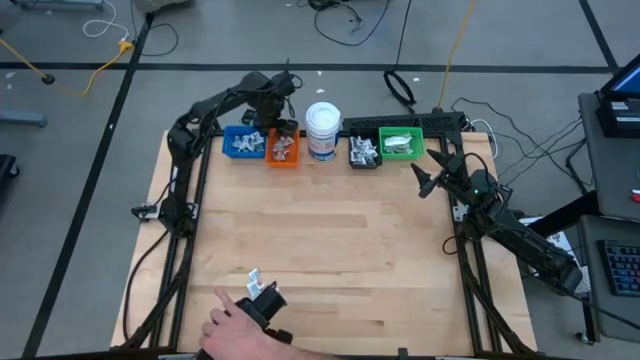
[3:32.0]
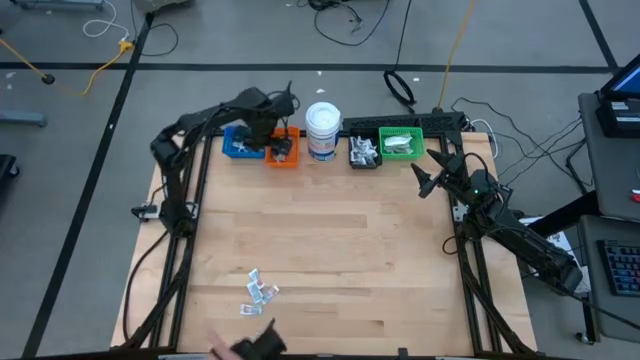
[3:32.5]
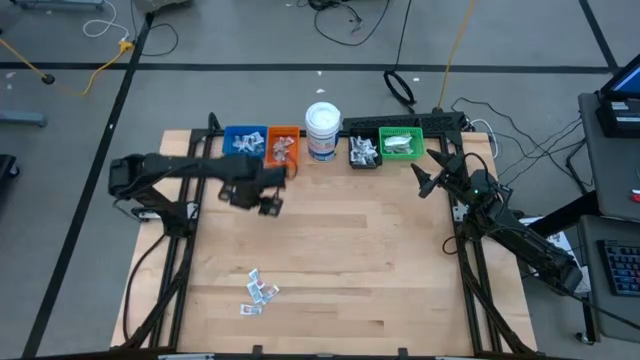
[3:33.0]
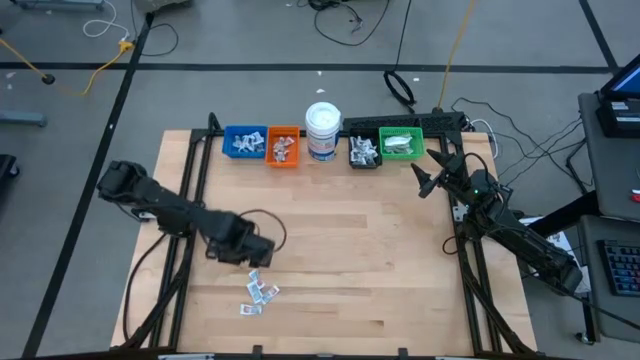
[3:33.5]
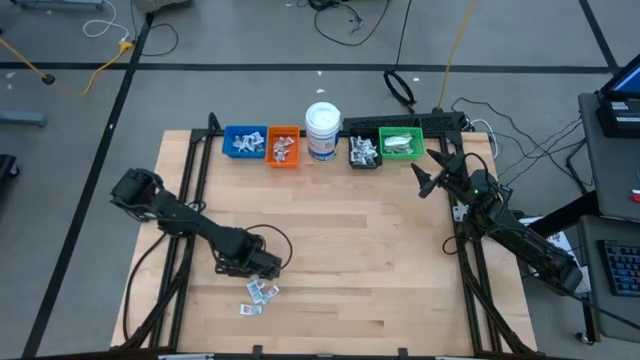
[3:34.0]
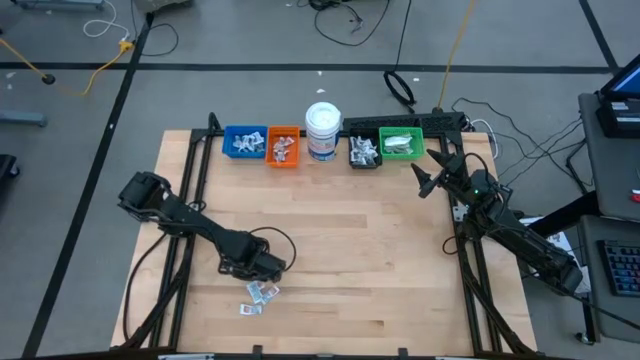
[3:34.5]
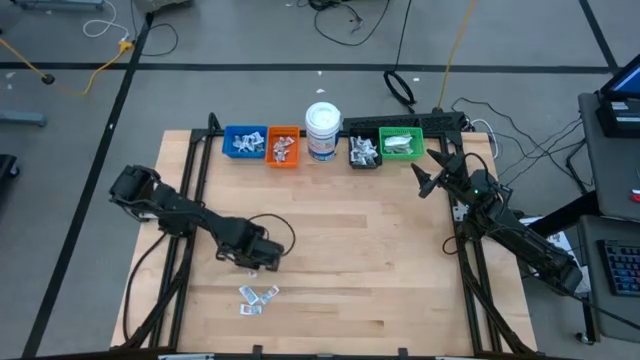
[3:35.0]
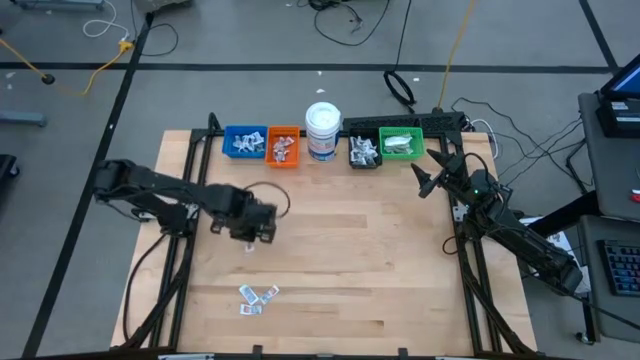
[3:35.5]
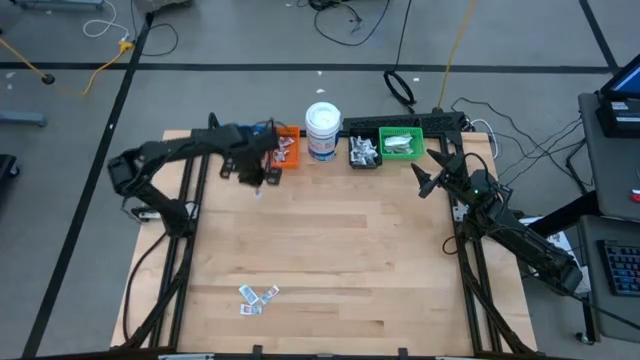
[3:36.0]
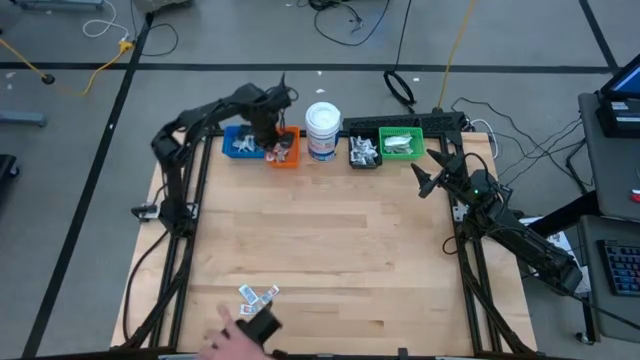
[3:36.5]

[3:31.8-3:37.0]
Task: Pick & Place First Aid Supplies
Put the ointment pack into the orange bin

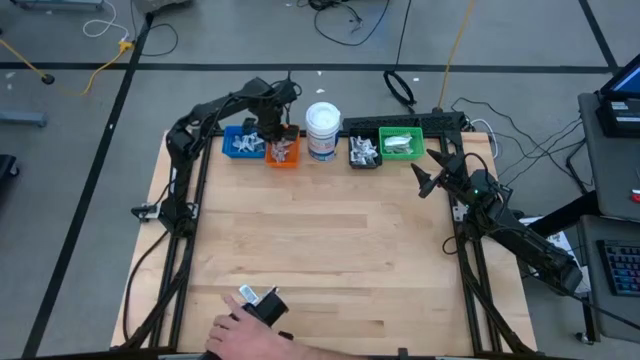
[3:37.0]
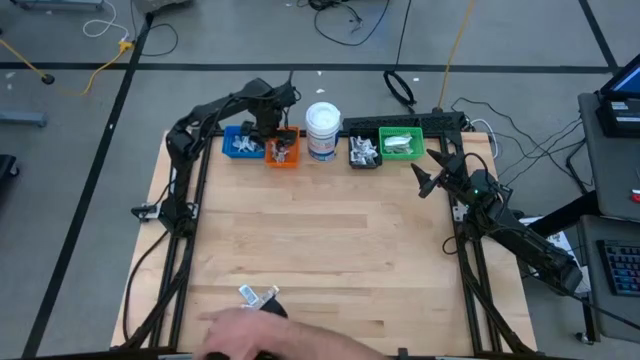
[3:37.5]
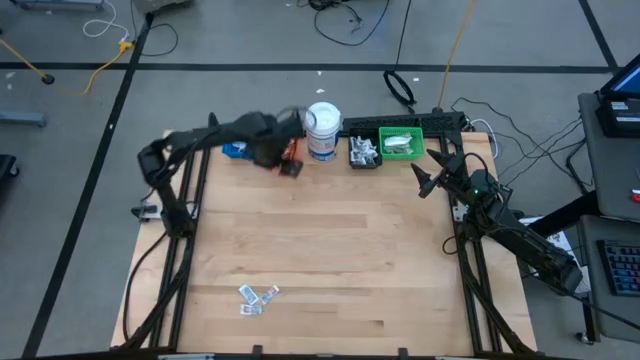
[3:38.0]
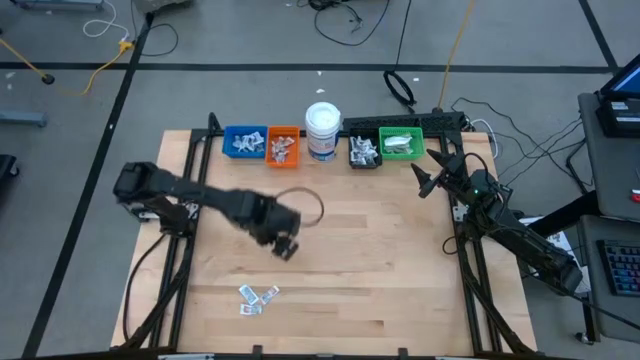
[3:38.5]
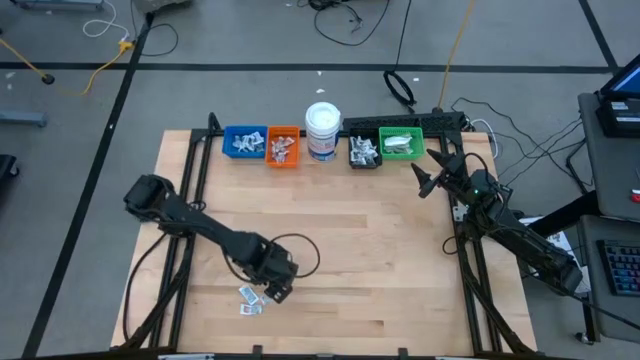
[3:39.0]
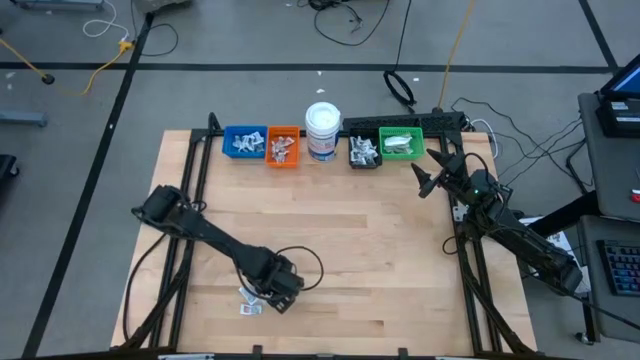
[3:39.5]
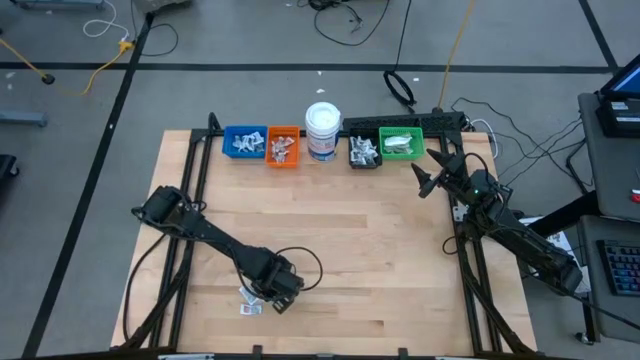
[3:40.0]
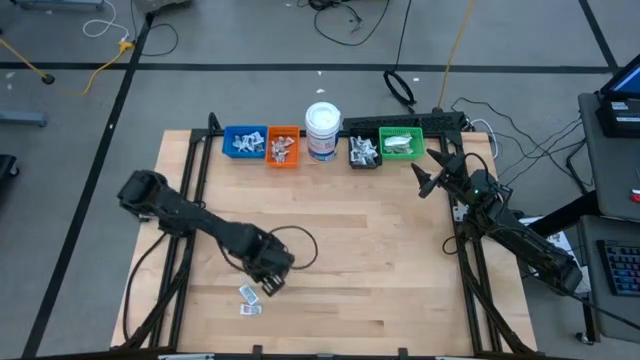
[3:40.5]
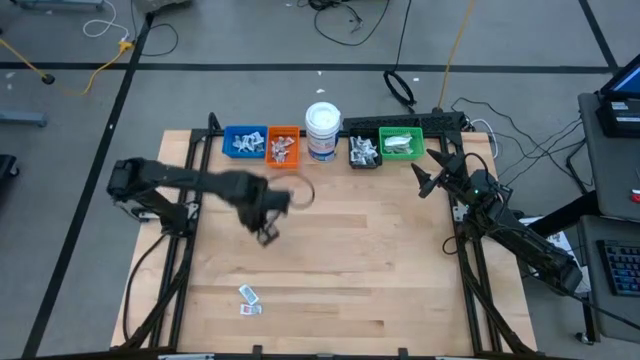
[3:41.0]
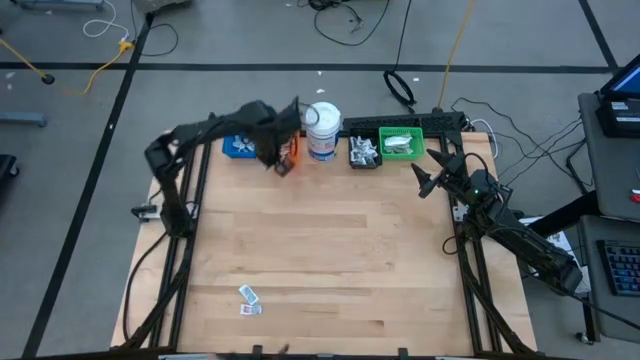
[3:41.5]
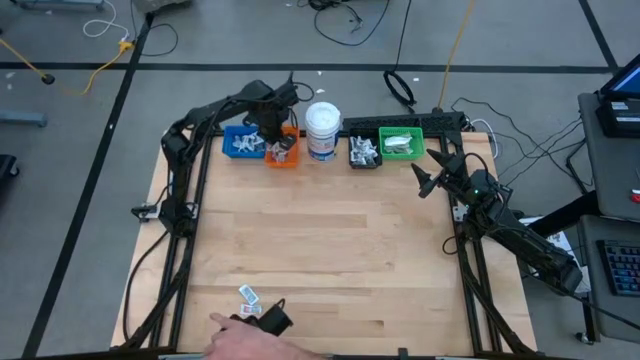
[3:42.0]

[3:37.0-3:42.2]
Put the ointment pack into the orange bin

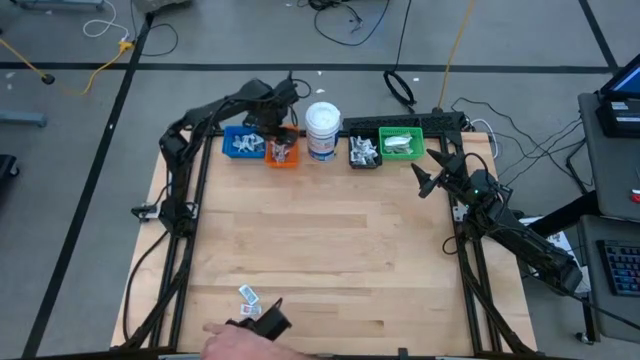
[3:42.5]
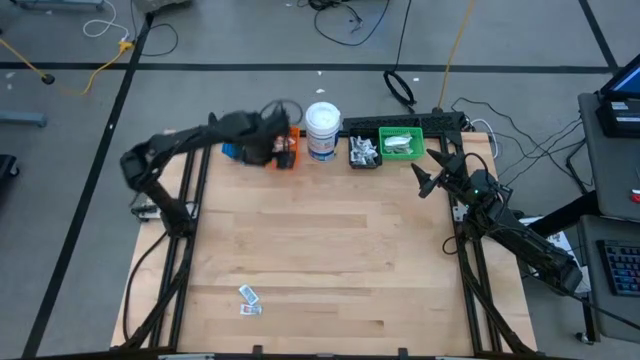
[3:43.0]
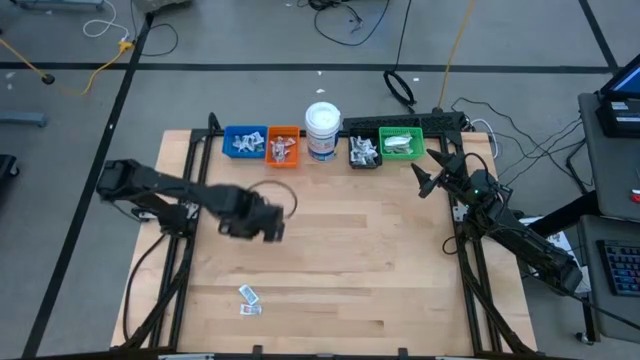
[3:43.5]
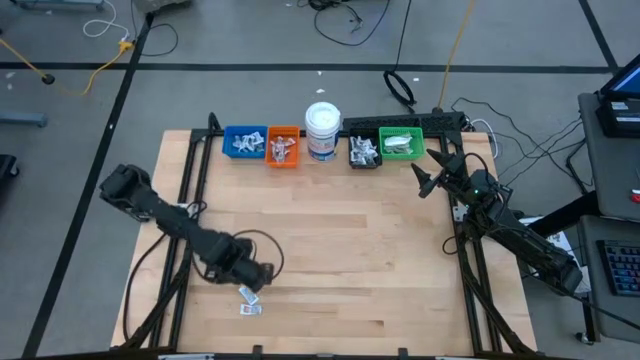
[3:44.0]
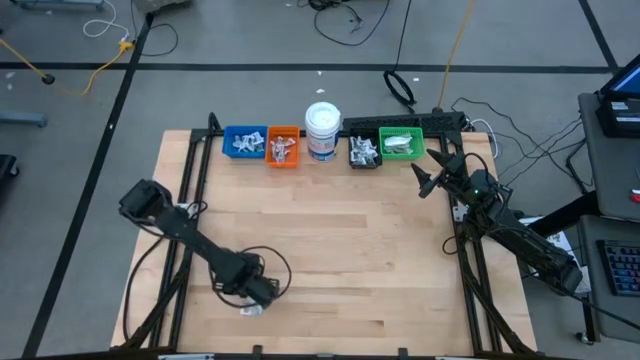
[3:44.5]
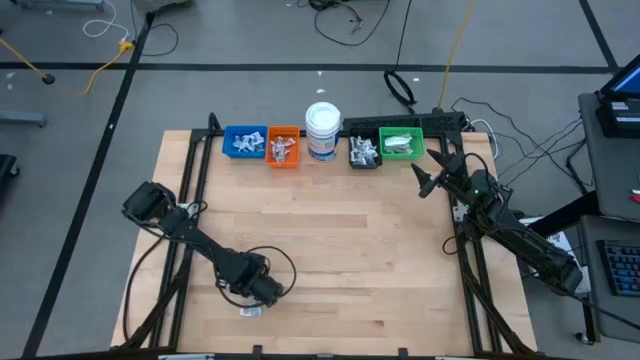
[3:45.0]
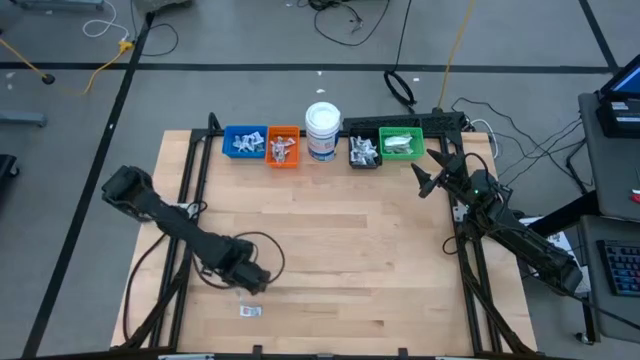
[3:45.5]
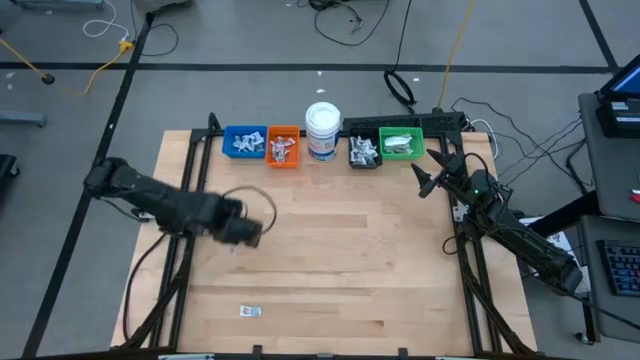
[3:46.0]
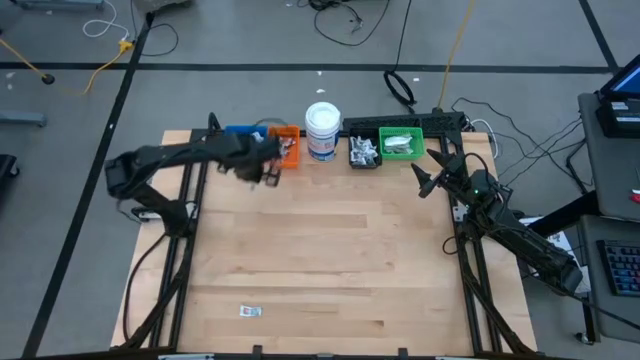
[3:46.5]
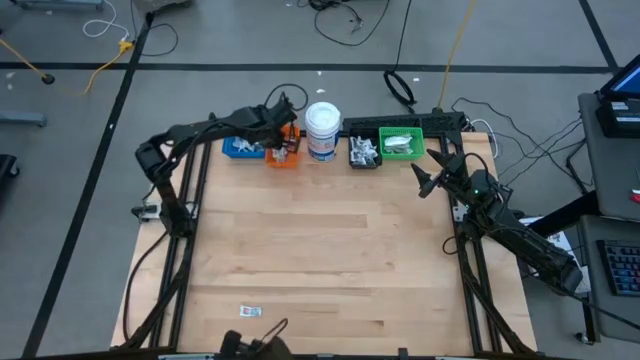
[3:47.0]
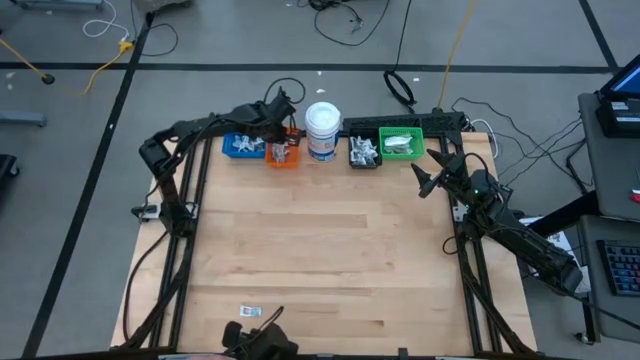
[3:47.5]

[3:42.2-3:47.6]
Put the ointment pack into the orange bin

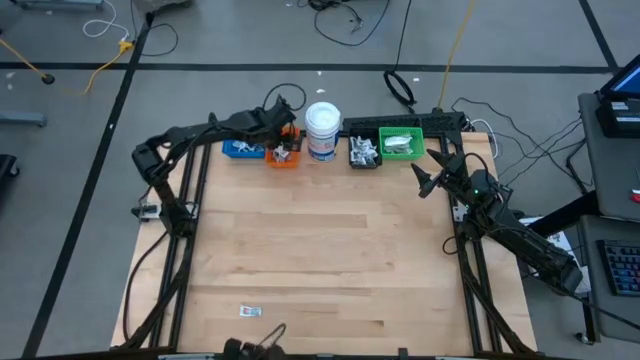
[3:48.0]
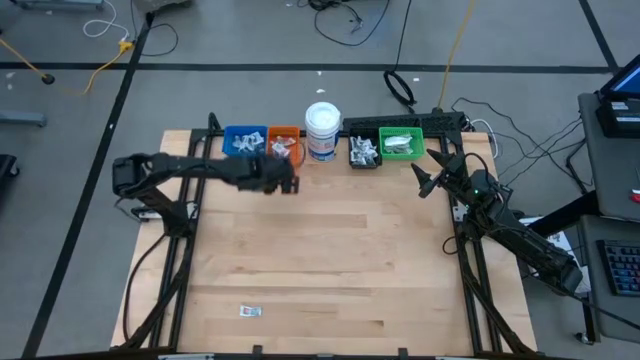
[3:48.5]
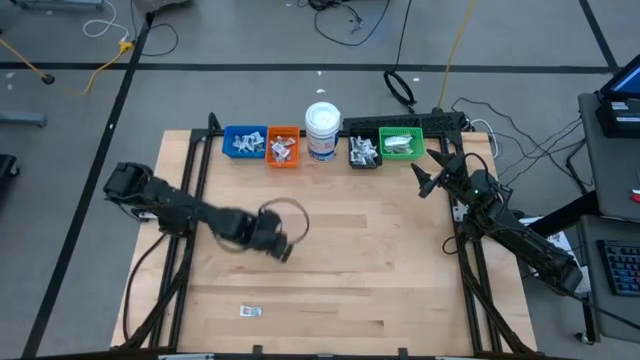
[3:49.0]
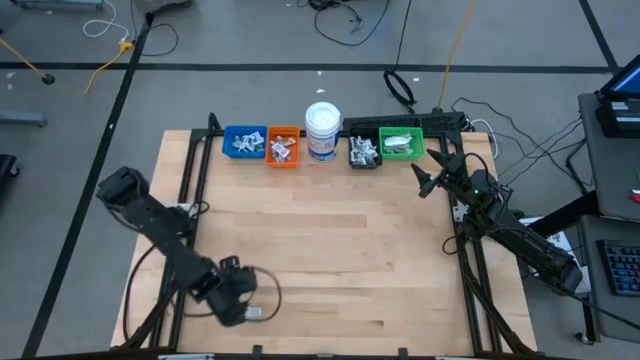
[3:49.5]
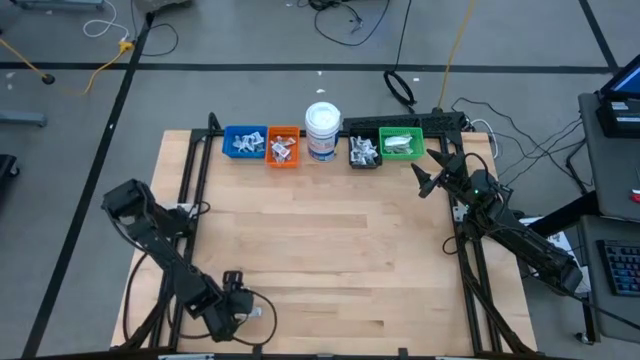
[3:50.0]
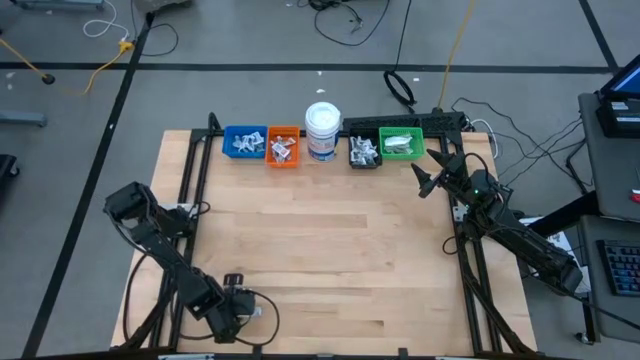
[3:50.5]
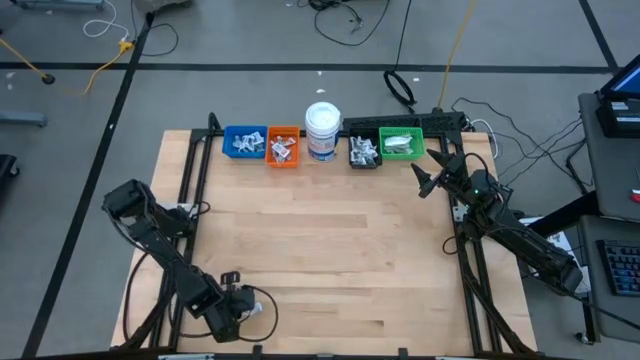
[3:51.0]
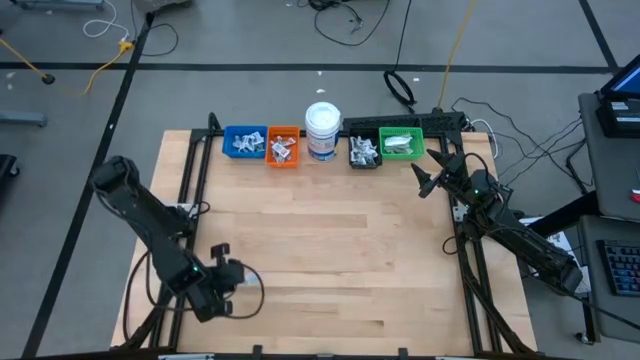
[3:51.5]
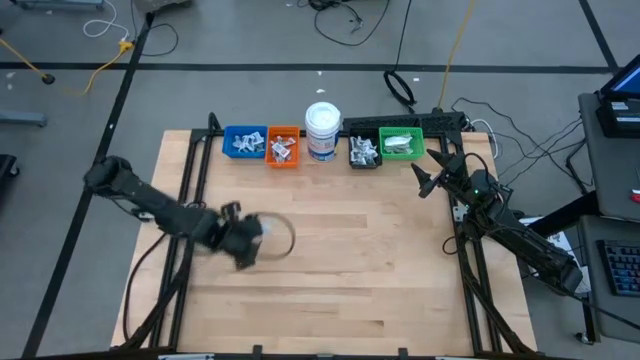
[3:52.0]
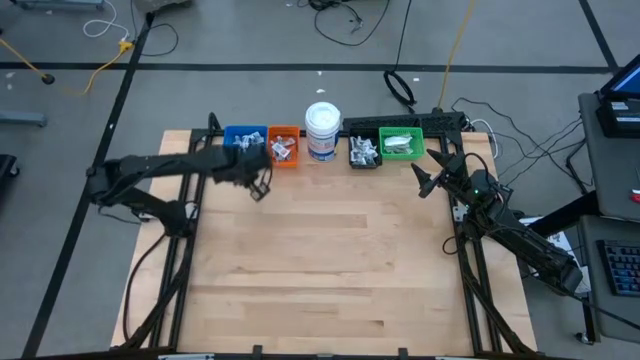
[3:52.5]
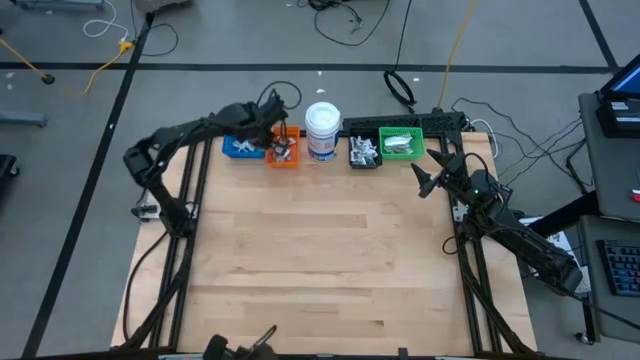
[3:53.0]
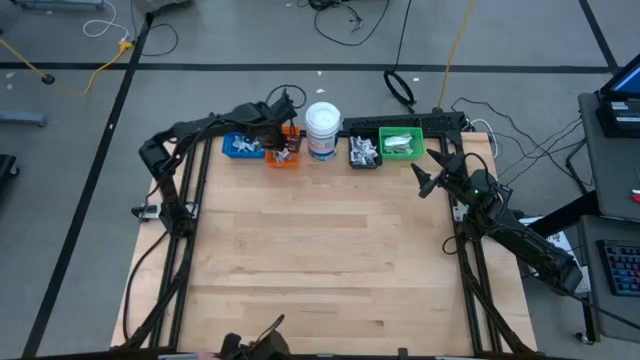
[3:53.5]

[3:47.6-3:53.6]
Put the ointment pack into the orange bin
